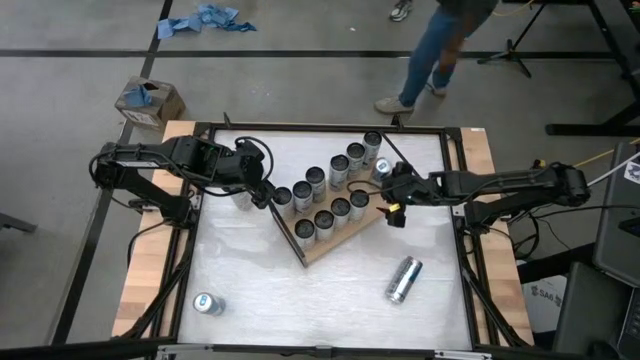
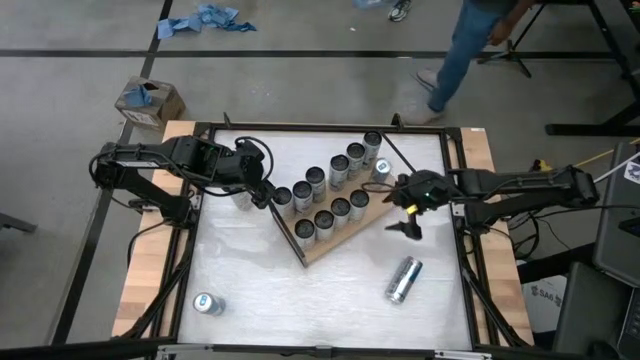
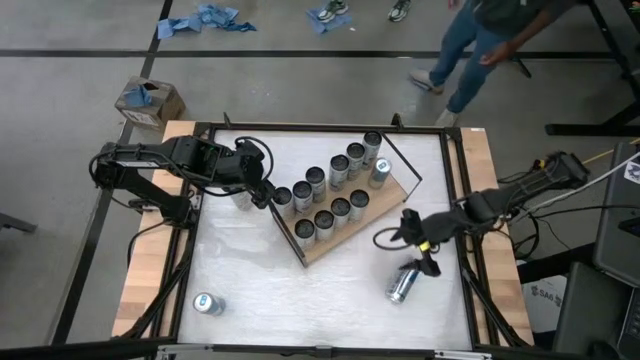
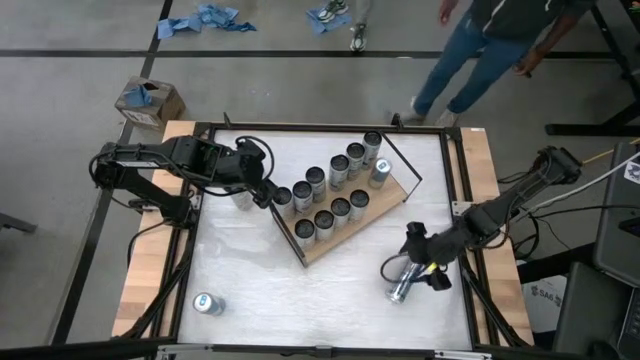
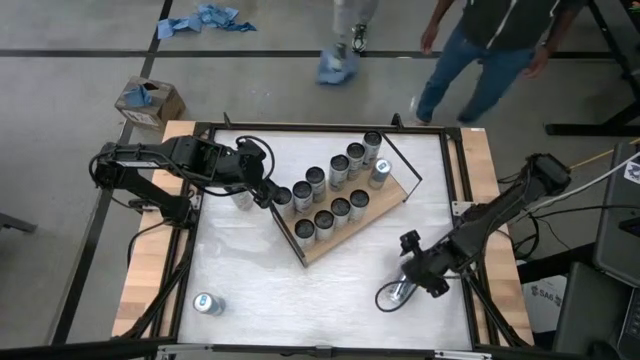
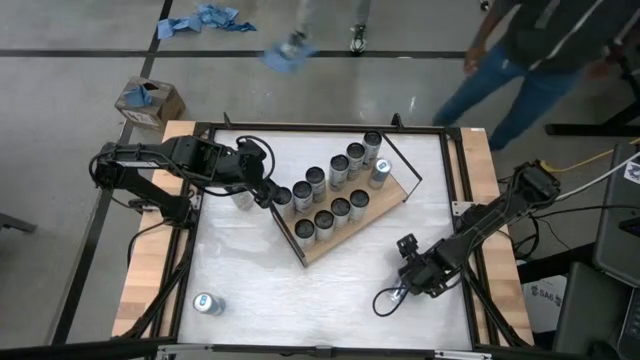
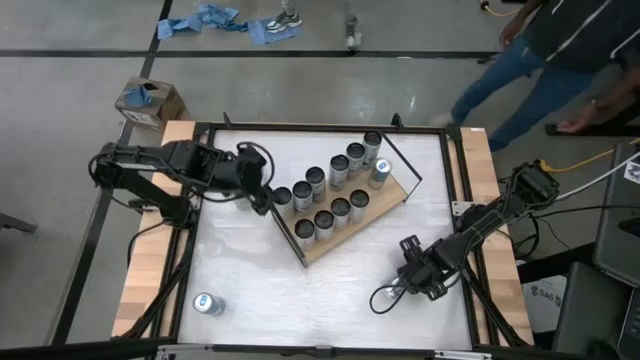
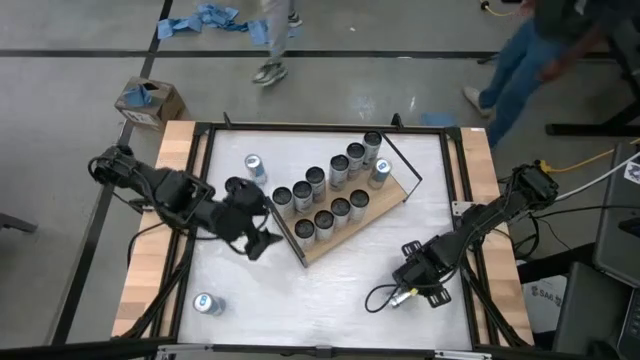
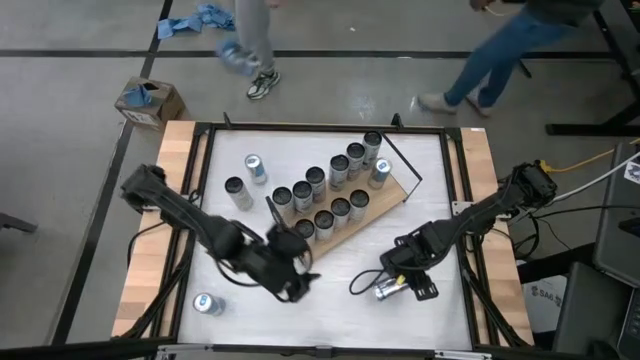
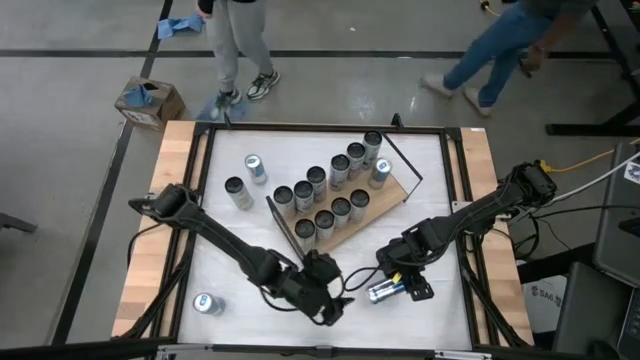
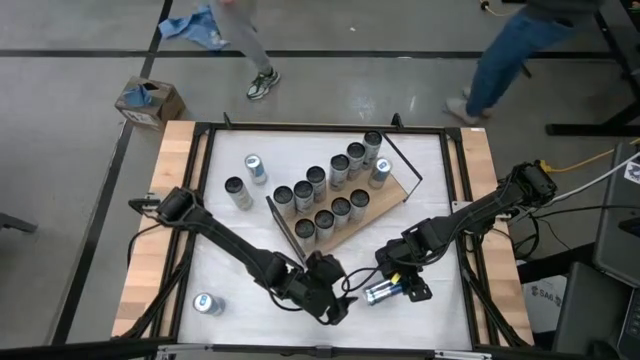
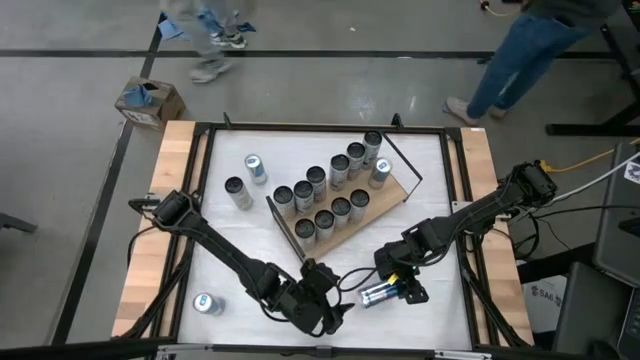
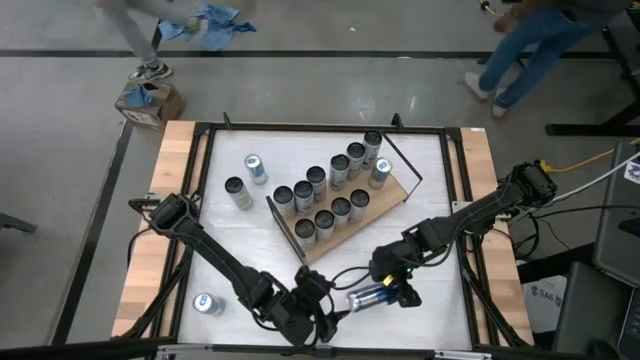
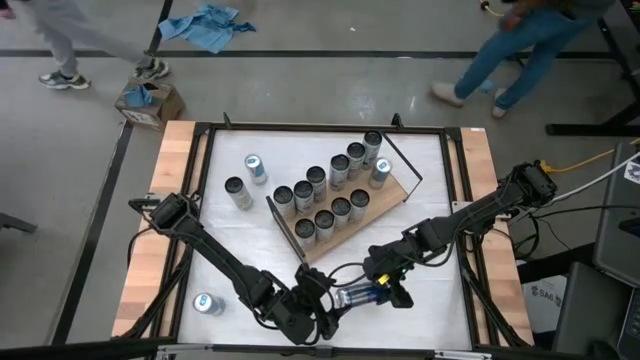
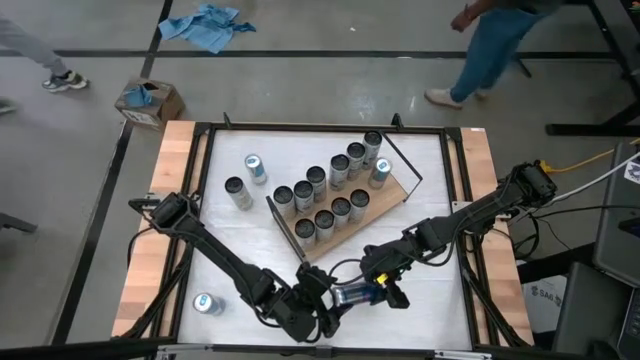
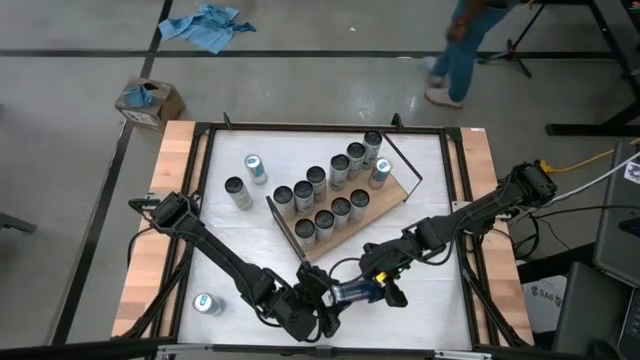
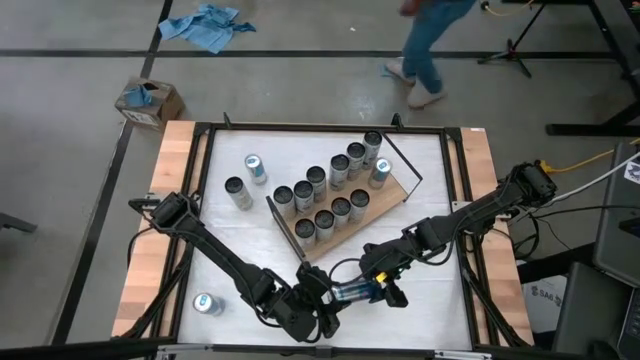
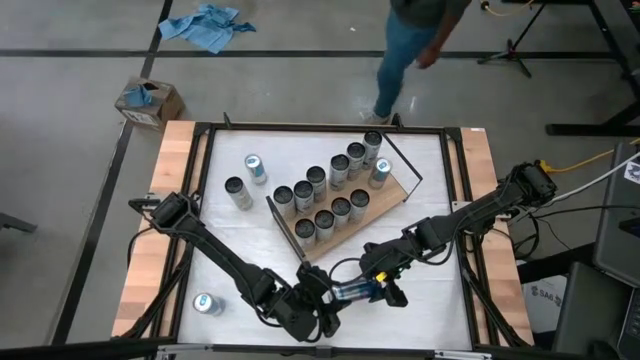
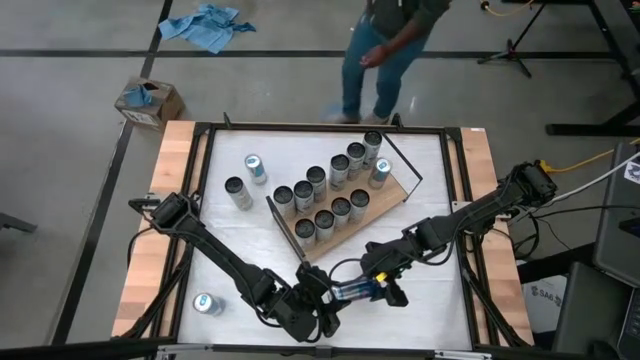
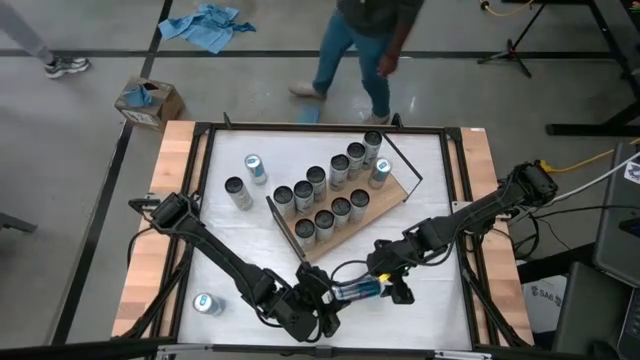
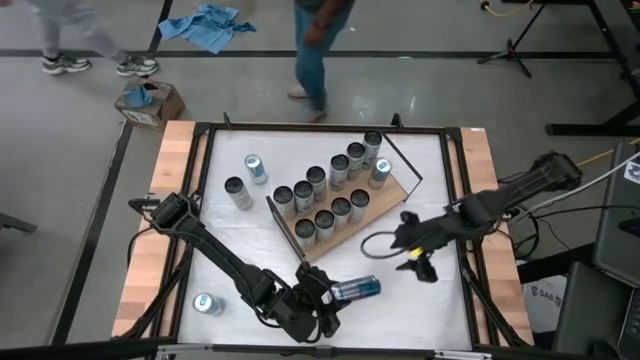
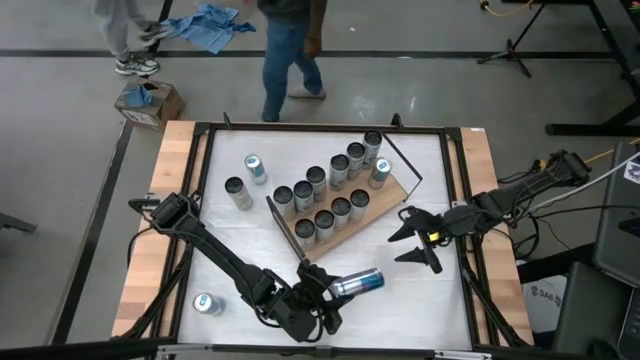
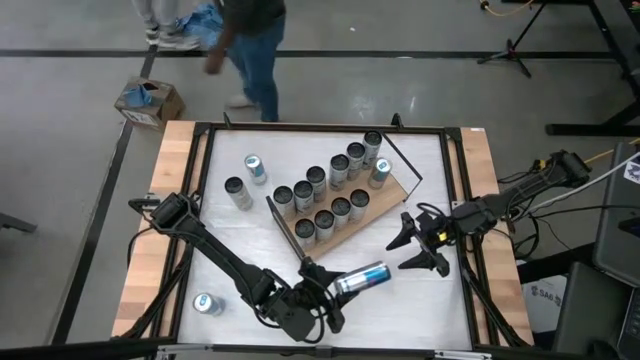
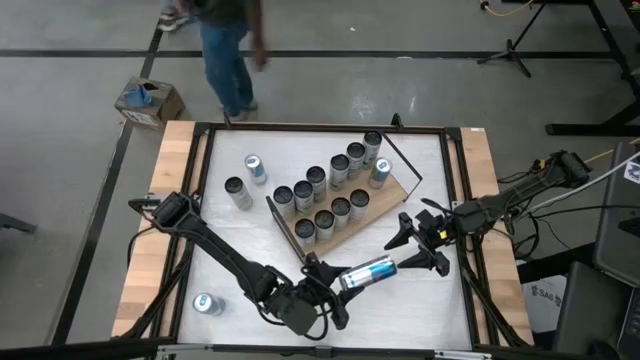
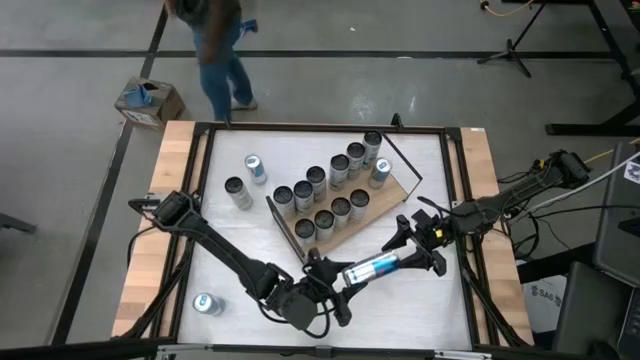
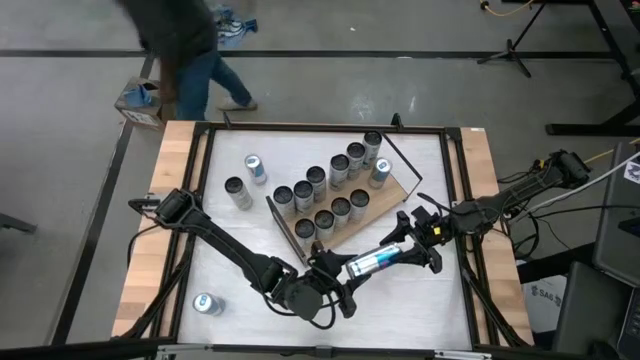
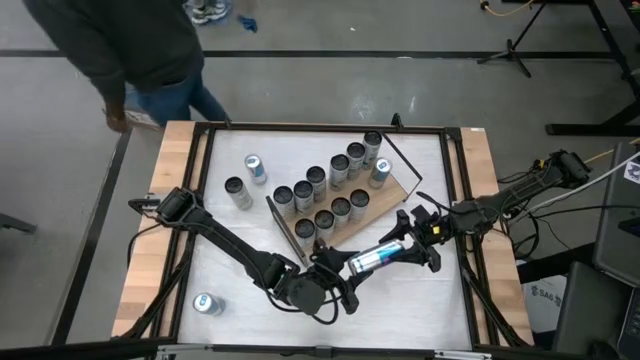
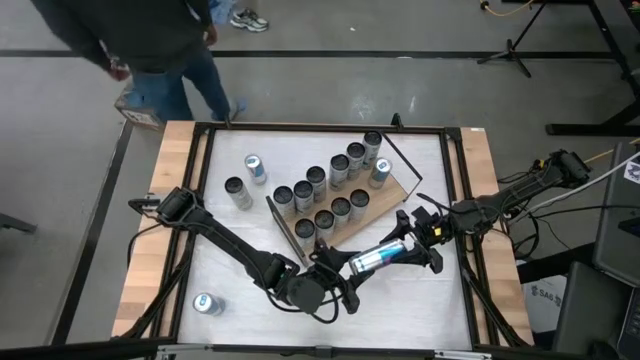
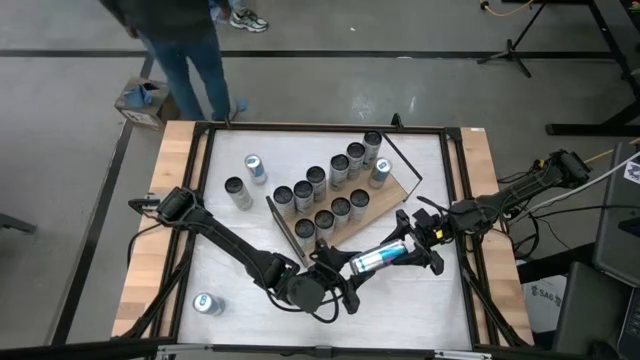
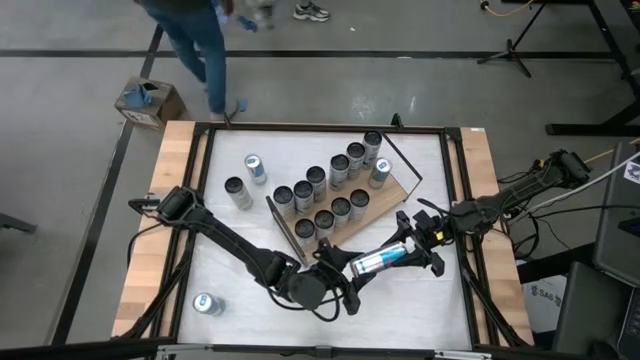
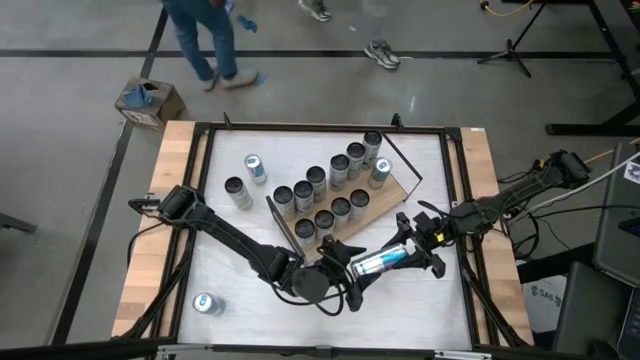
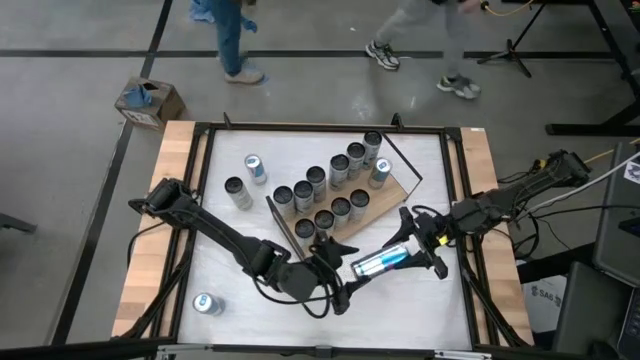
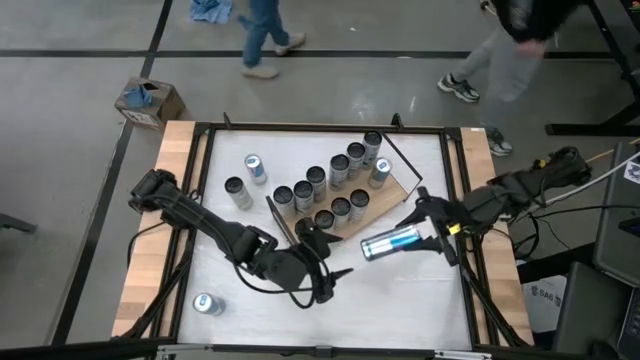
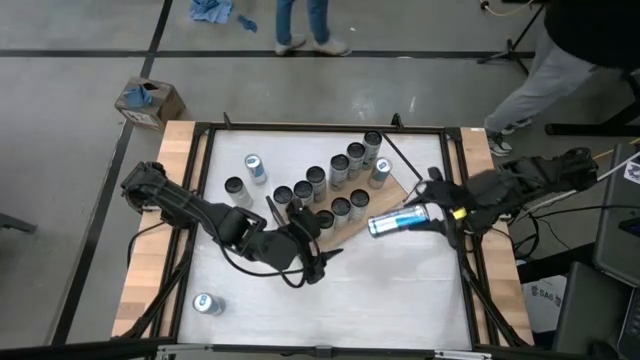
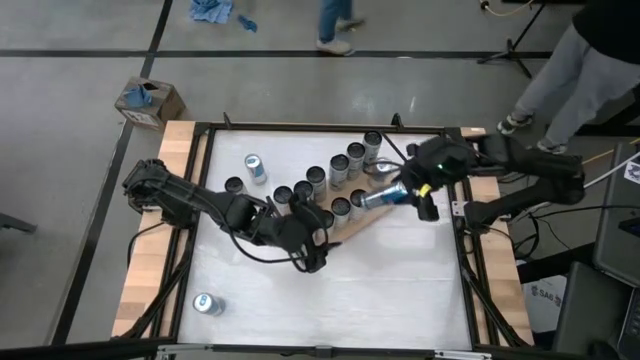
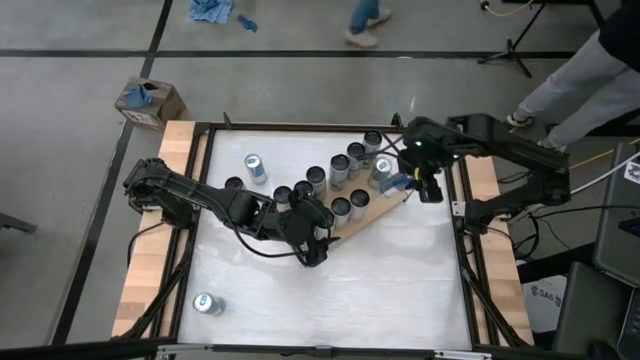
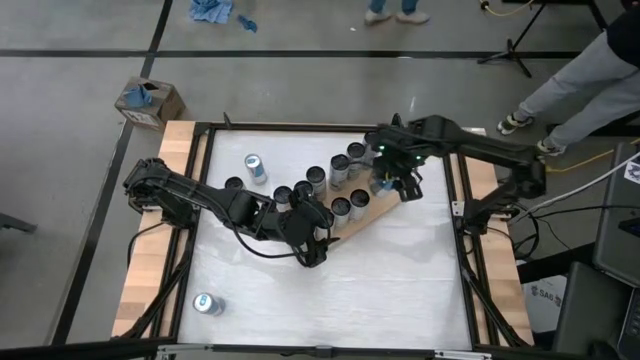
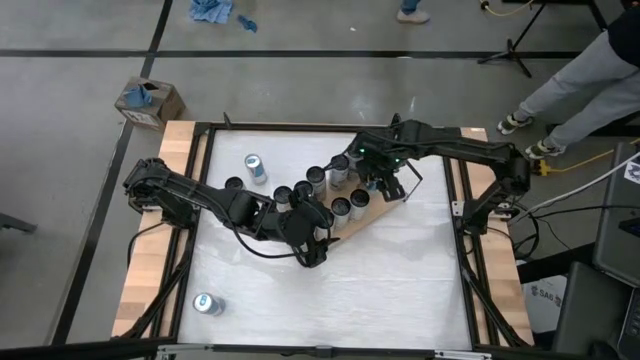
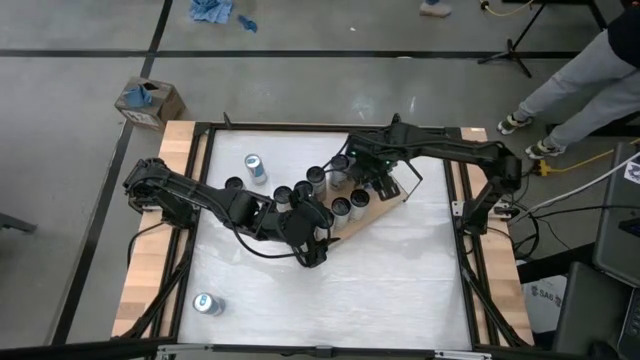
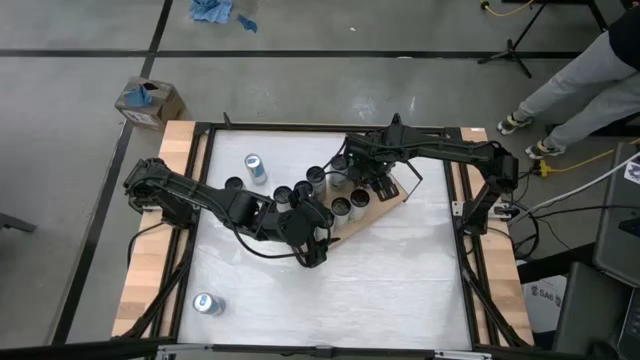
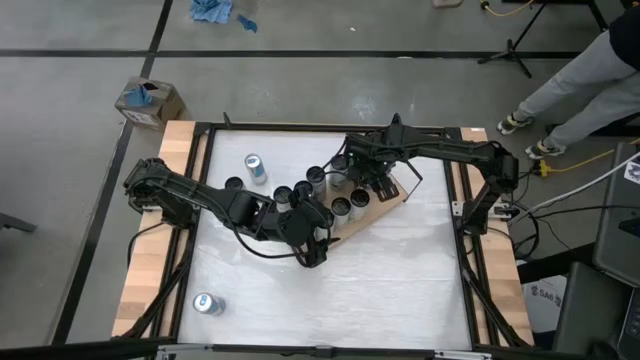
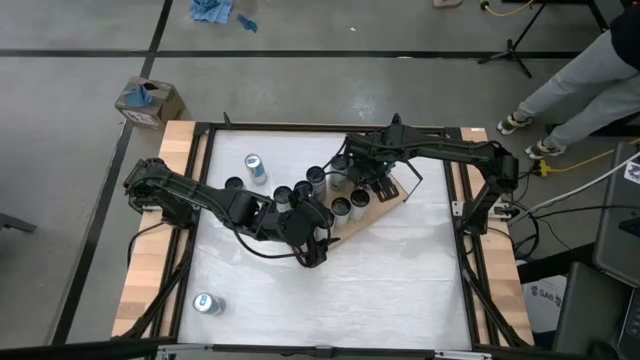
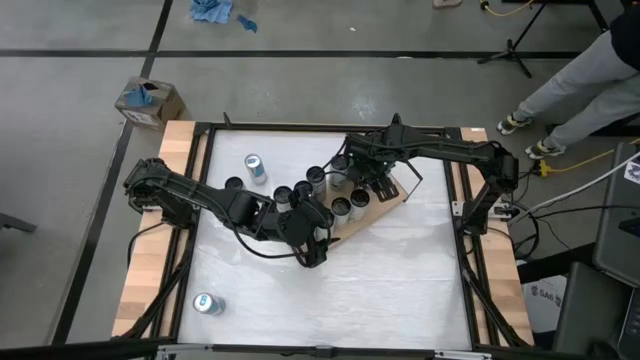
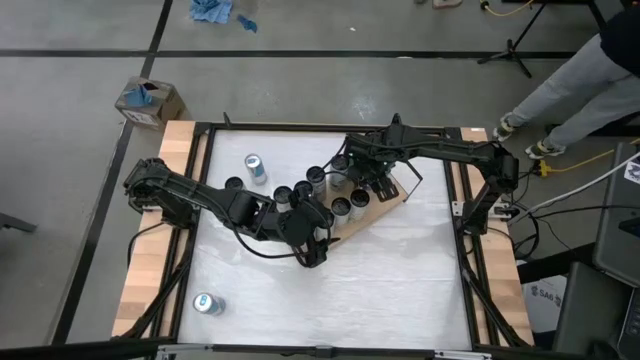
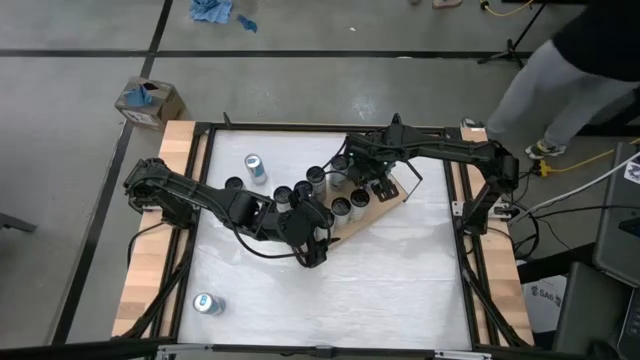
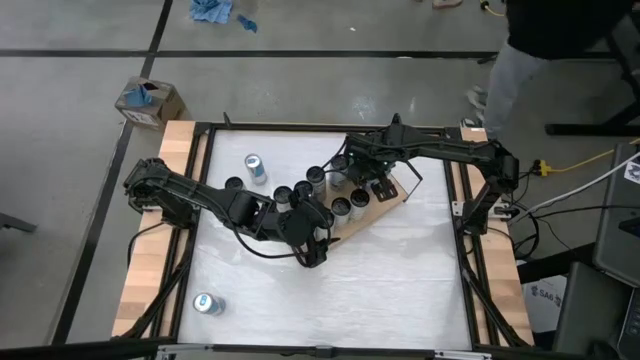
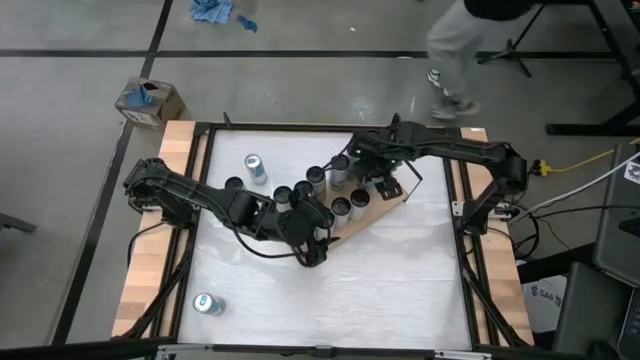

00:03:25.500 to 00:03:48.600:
Task: Place canned beverage on shelf
Put the blue soda can on the shelf
